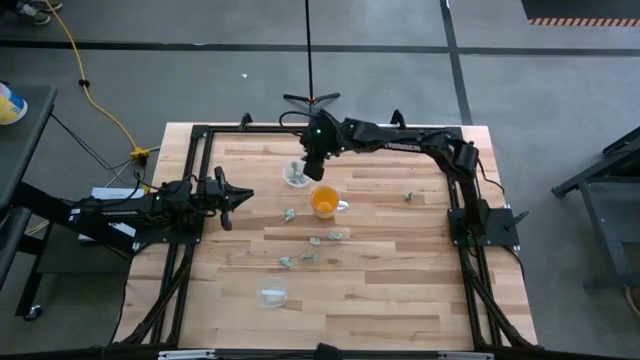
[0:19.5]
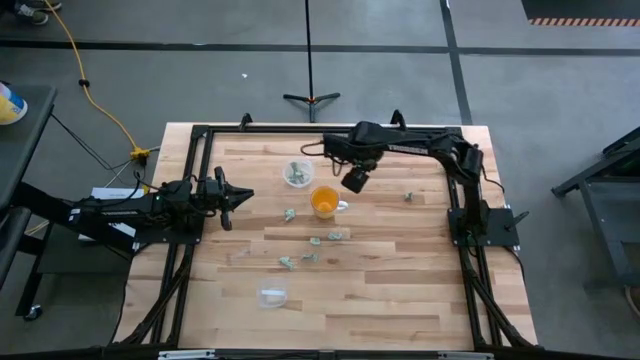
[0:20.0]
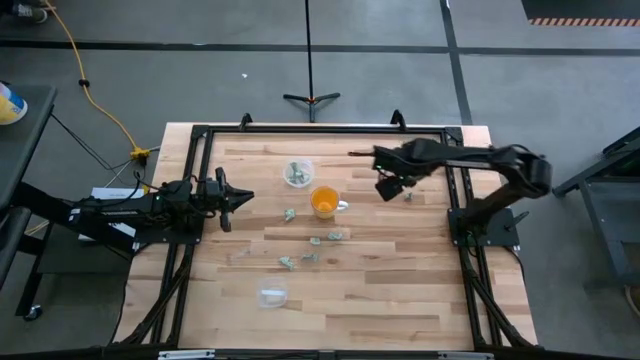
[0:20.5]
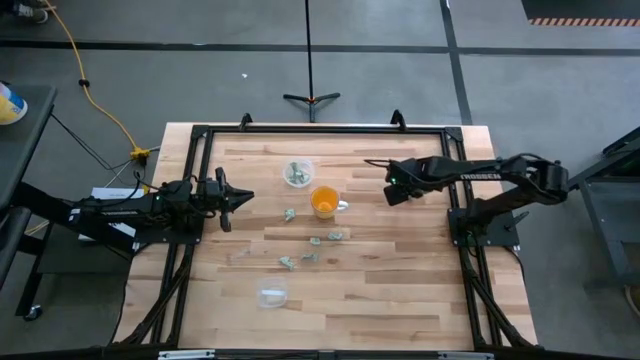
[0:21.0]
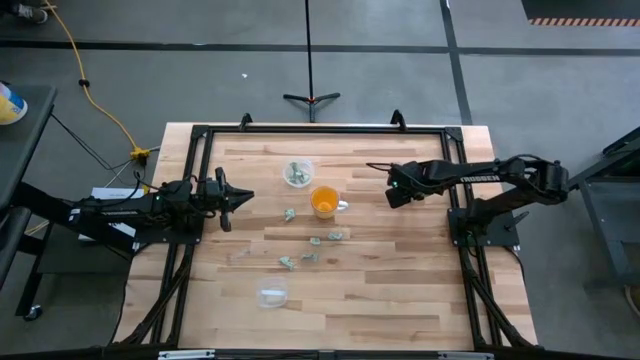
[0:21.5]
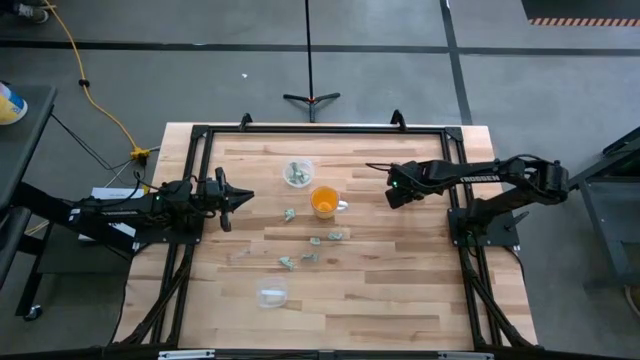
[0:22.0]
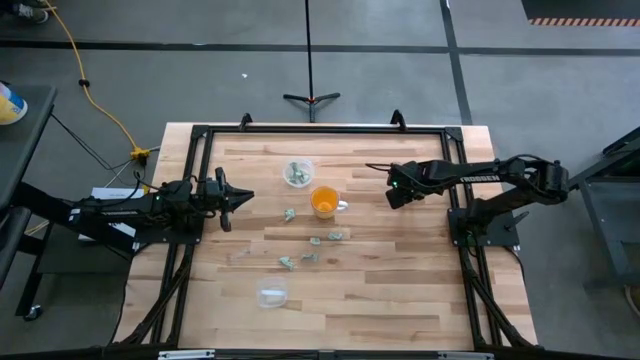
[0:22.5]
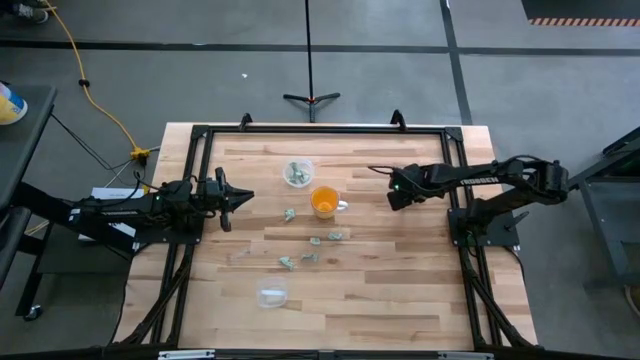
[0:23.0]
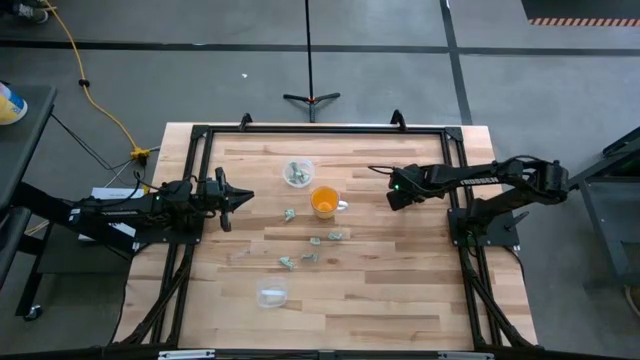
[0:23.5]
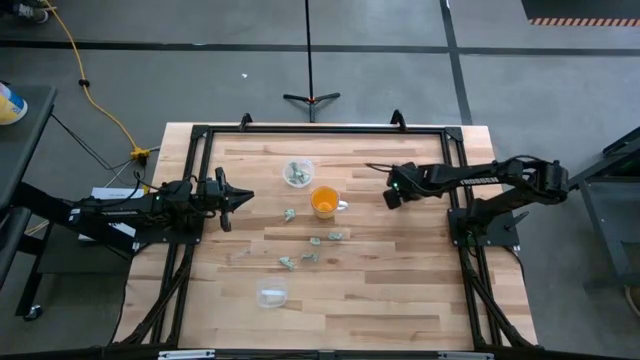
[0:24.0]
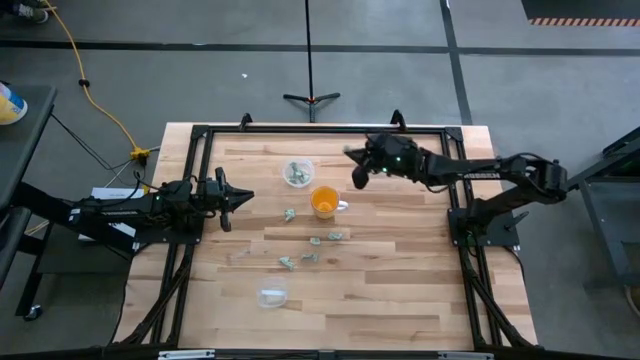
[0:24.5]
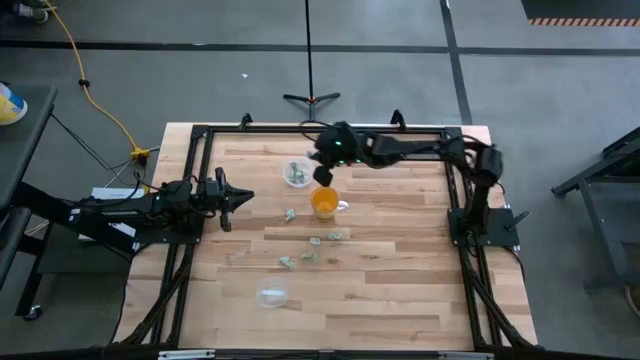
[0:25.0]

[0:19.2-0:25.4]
Task: Pick and place items into bin
Put the light green stevia packet into the top transparent bin

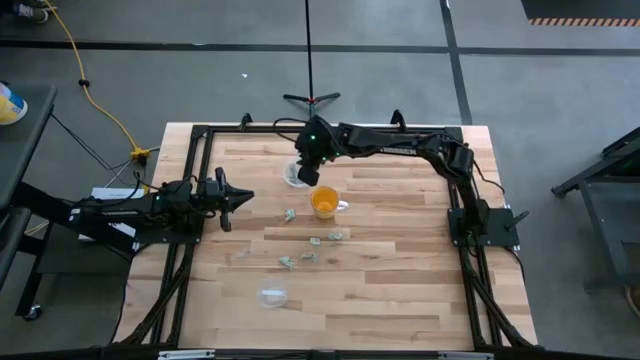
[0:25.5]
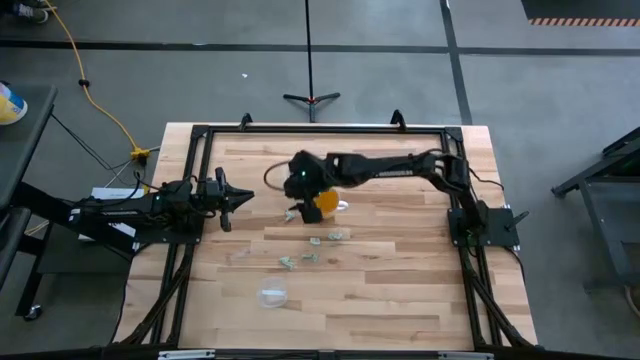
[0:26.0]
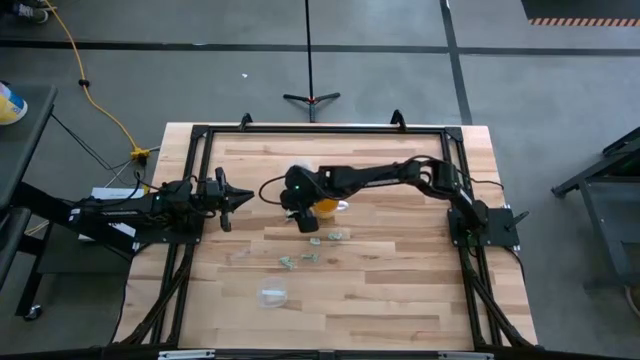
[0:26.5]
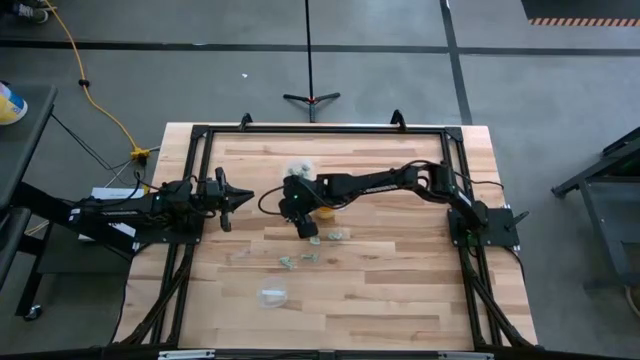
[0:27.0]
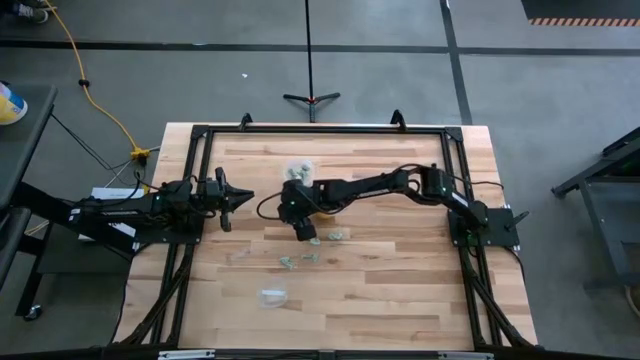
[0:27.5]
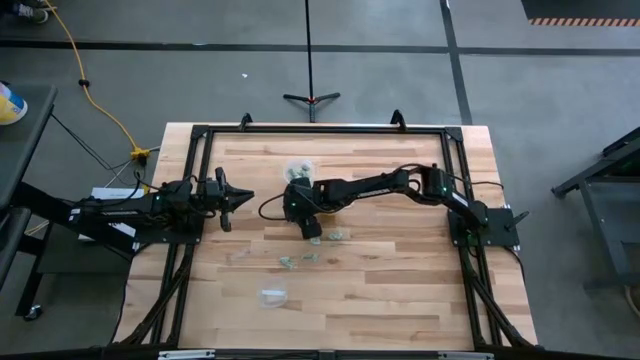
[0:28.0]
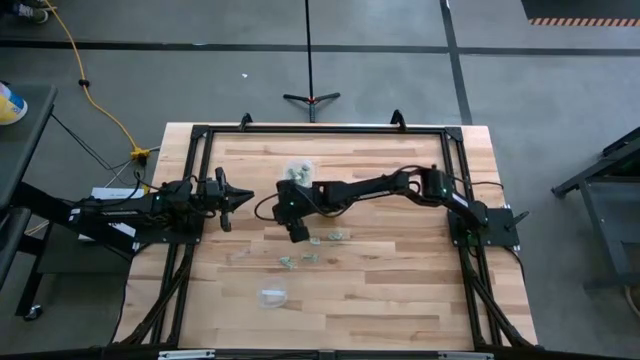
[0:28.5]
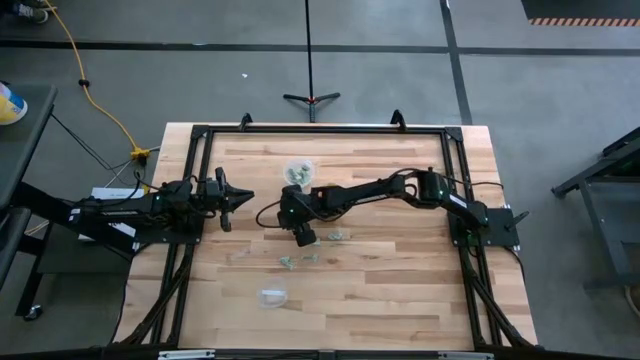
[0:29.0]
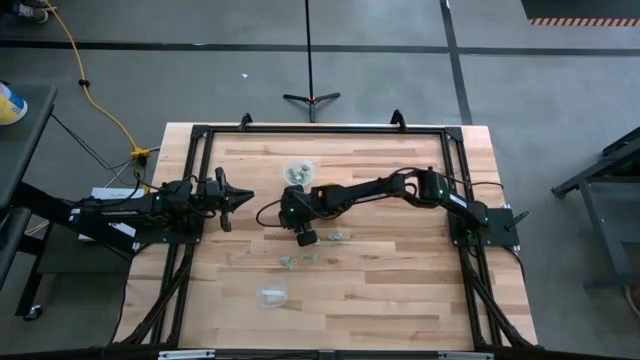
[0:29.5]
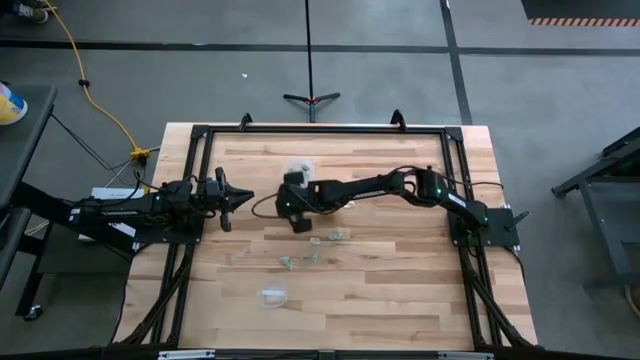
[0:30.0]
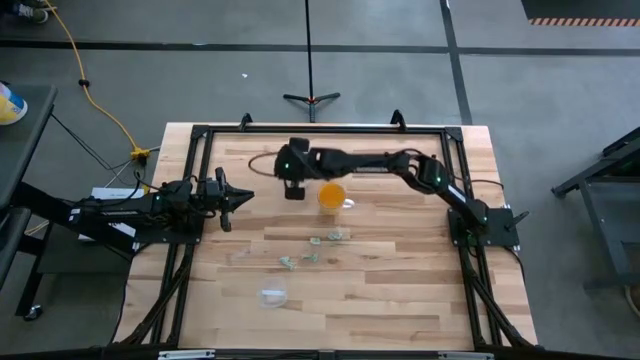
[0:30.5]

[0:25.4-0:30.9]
Put the light green stevia packet into the top transparent bin

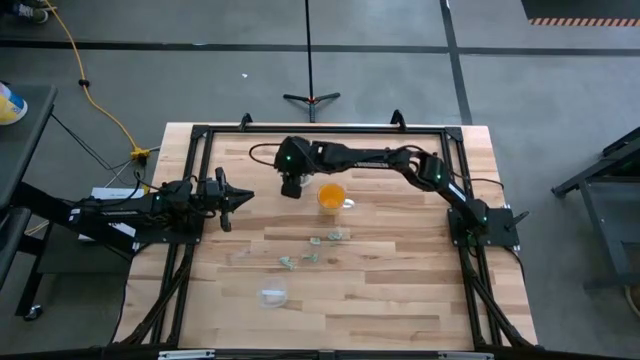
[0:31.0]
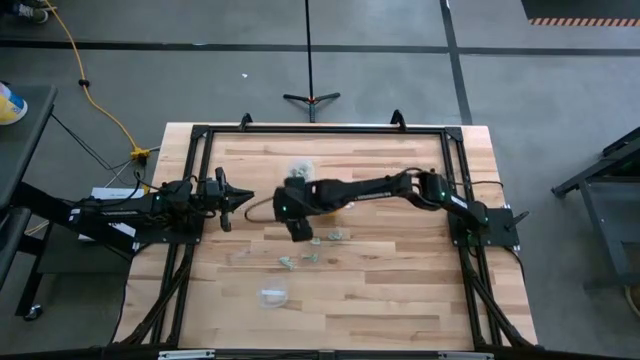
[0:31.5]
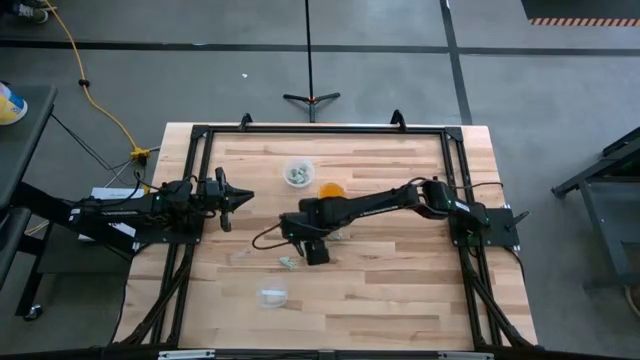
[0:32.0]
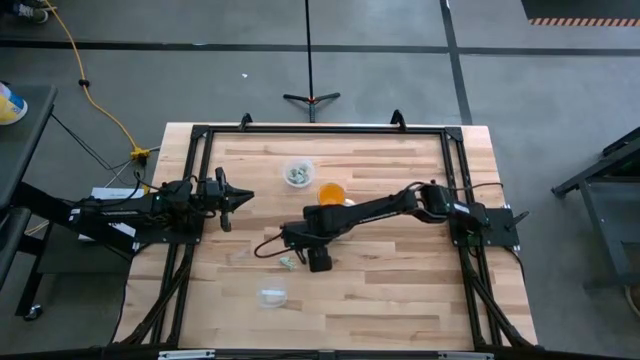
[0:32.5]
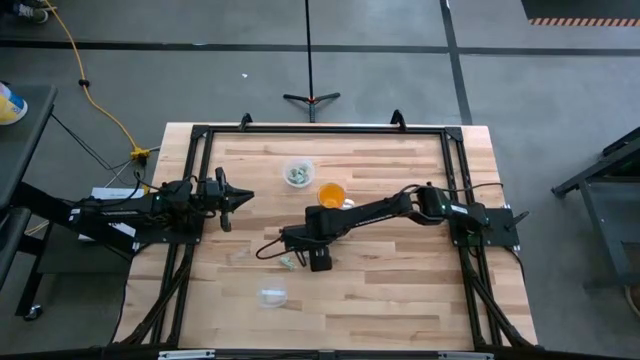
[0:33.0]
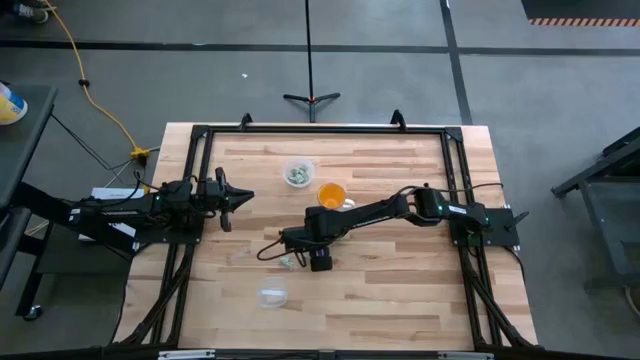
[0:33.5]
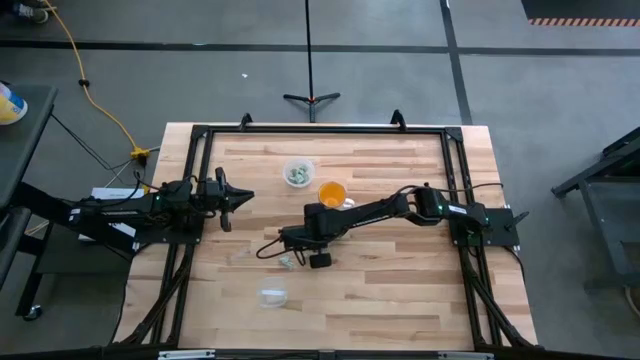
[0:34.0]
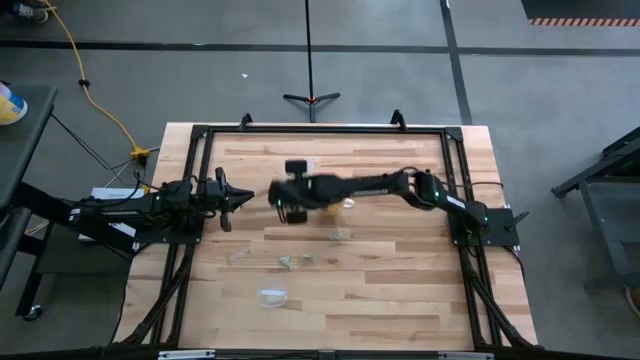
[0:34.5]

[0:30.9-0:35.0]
Put the light green stevia packet into the top transparent bin

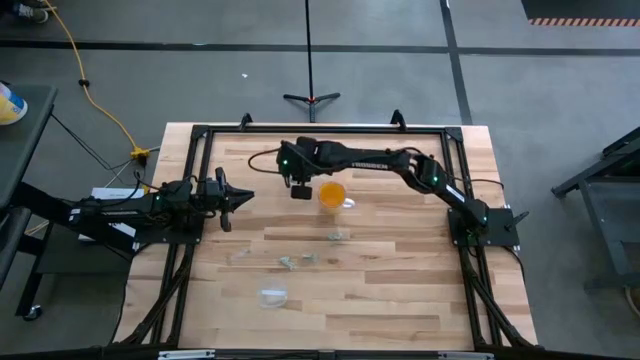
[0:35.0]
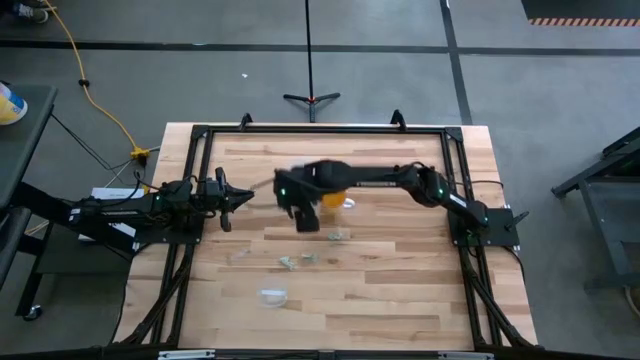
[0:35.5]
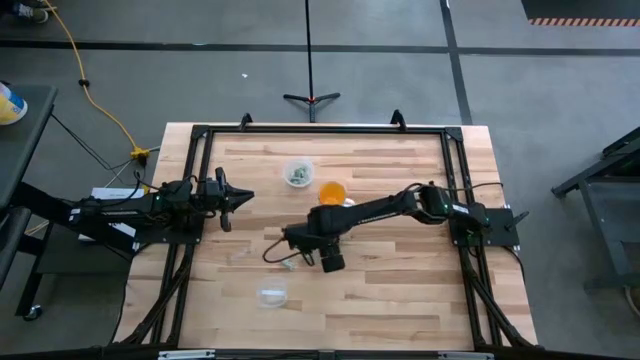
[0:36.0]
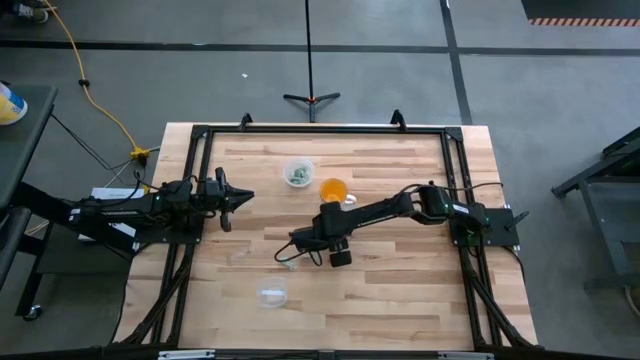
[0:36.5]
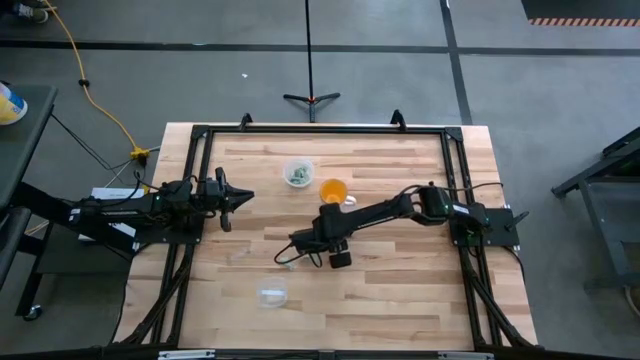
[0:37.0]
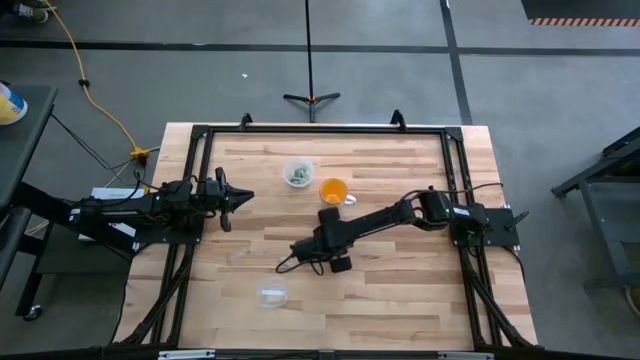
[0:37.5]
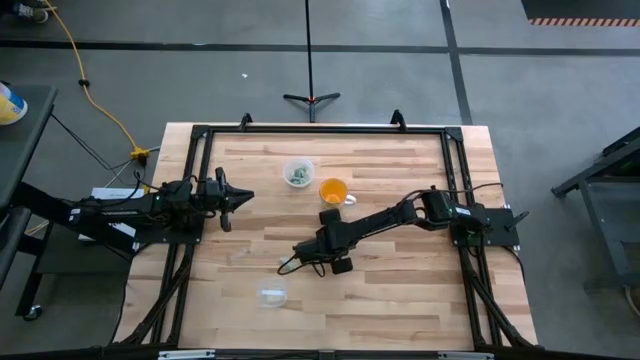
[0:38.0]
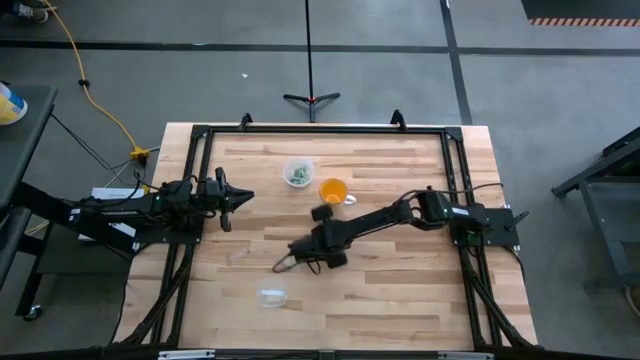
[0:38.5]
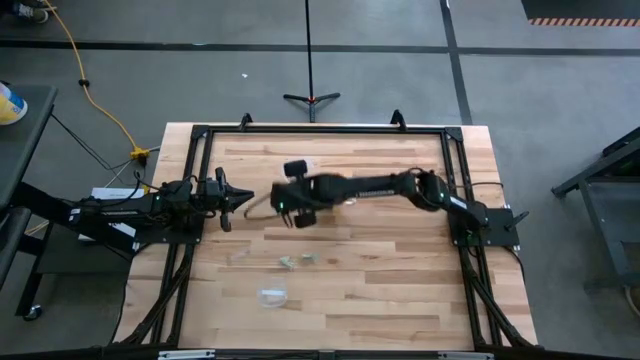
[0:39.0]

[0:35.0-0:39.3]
Put the light green stevia packet into the top transparent bin
